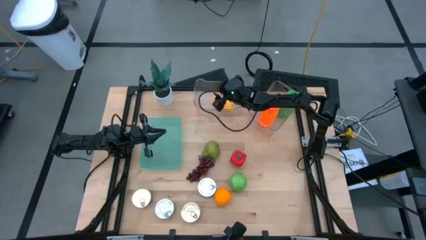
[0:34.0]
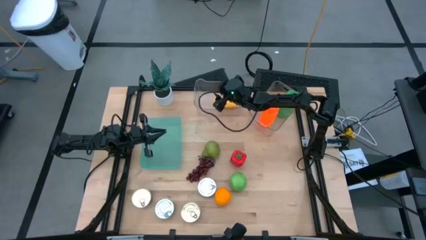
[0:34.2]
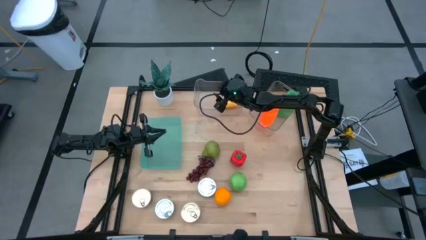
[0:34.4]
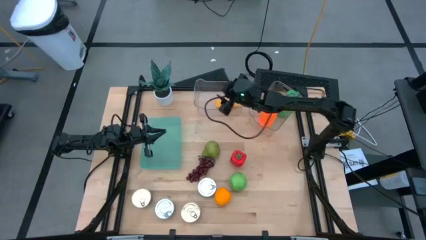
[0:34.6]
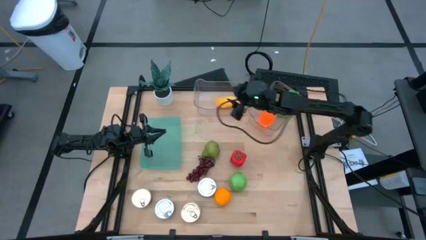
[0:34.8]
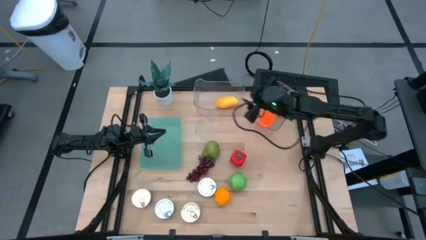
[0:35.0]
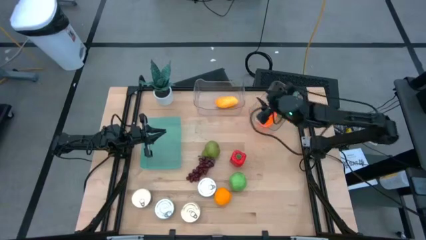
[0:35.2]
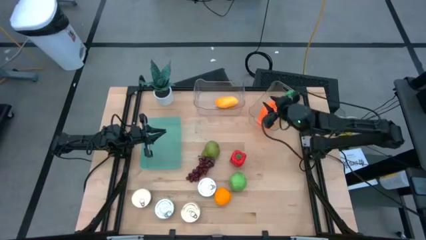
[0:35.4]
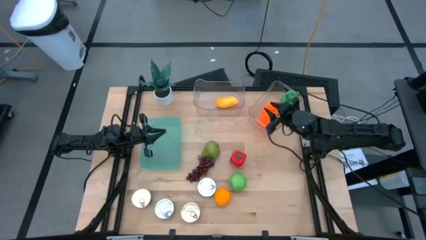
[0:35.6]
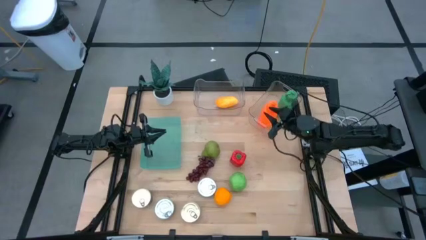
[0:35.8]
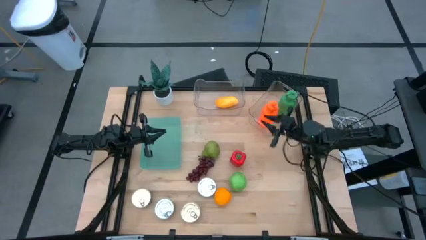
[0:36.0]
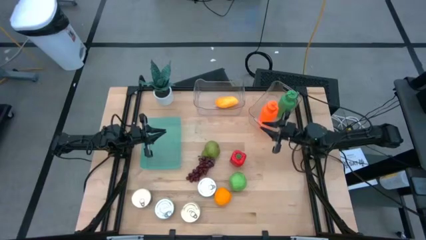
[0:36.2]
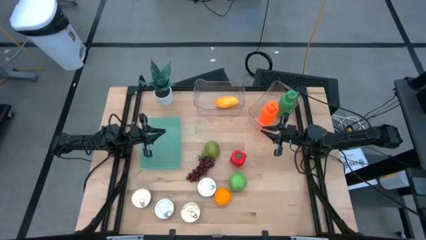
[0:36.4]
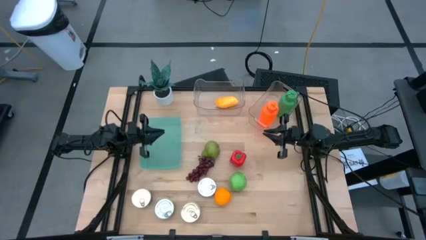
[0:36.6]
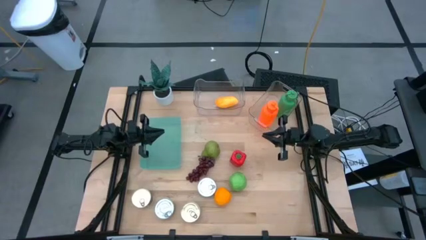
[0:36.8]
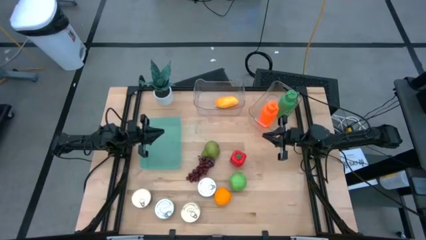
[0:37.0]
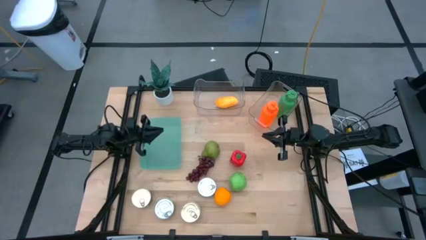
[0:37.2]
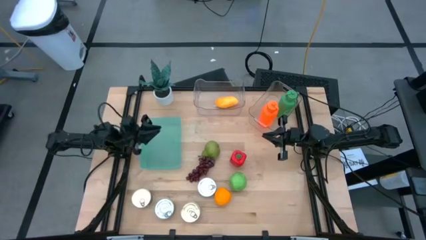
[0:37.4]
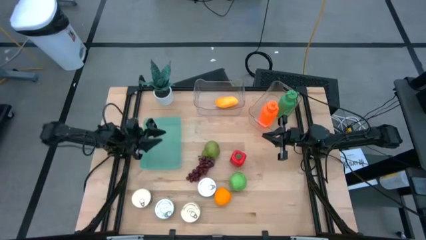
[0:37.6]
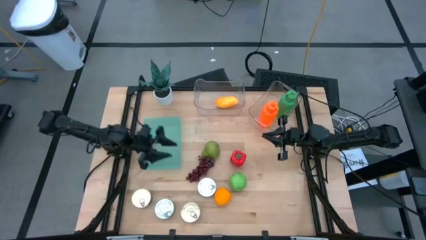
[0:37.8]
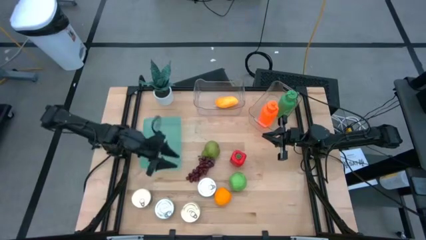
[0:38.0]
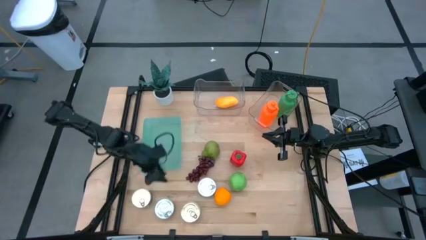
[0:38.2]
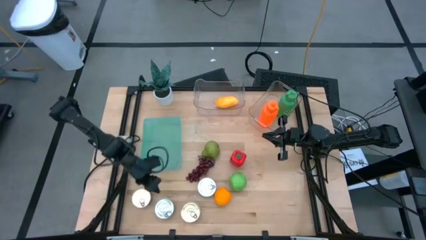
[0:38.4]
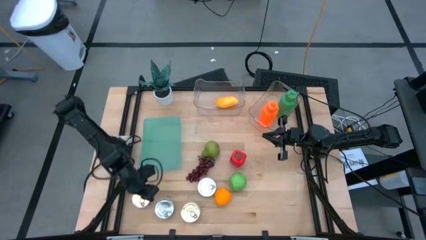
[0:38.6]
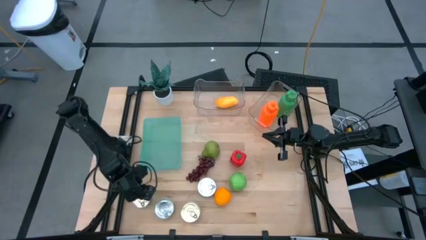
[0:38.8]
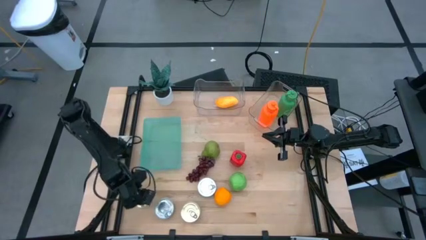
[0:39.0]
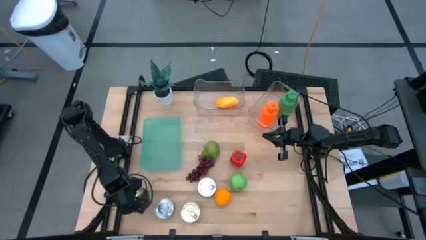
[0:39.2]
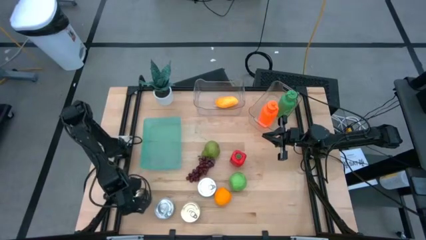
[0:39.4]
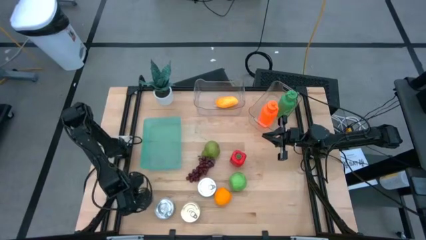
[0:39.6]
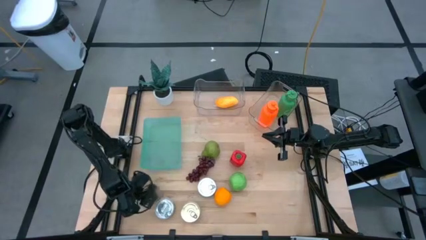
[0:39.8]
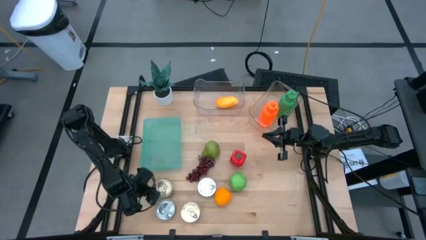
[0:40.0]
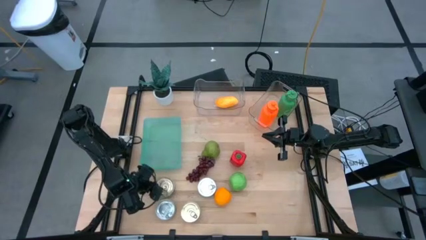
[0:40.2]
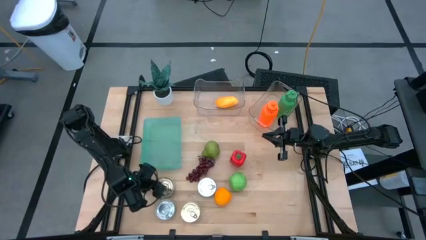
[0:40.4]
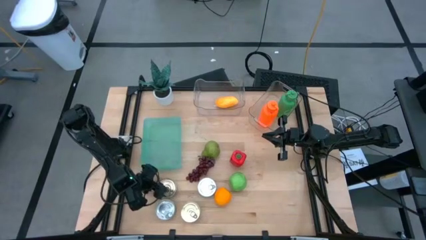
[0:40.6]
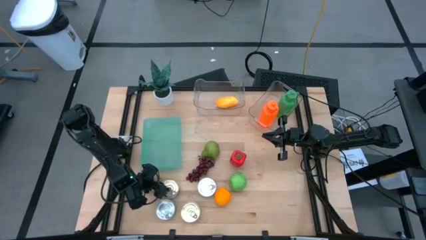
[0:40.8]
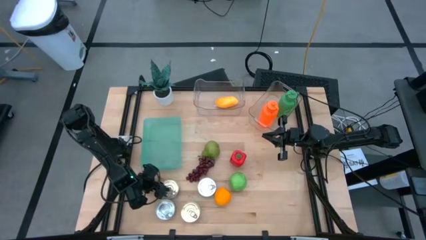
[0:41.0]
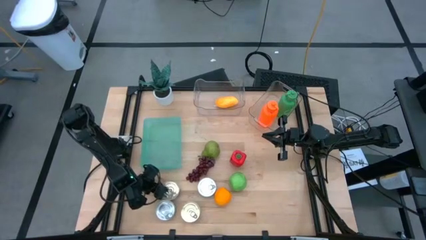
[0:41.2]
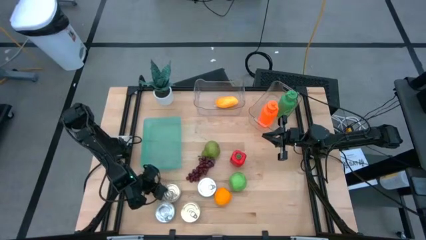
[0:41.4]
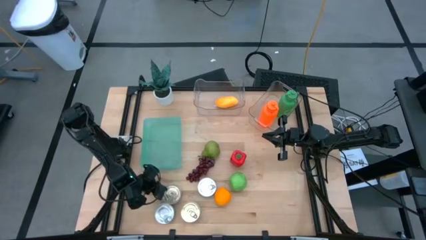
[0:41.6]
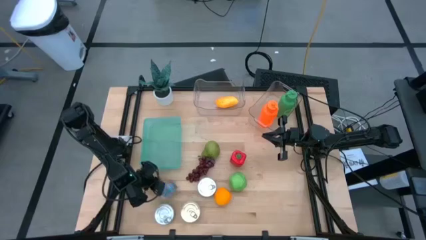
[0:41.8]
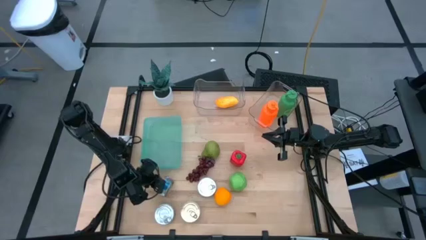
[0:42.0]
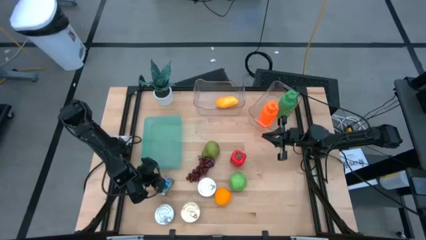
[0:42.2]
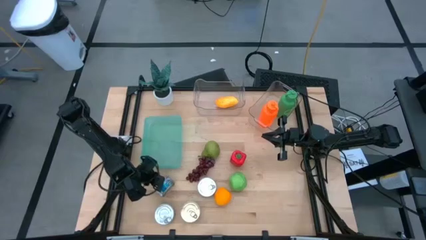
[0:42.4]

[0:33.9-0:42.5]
Task: Pick & Place Food Item
Put the blue pink tuna can into the green bin

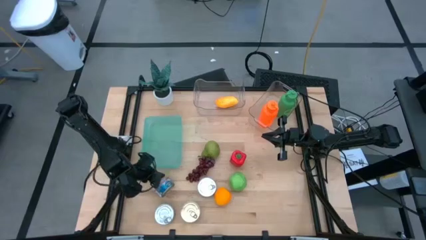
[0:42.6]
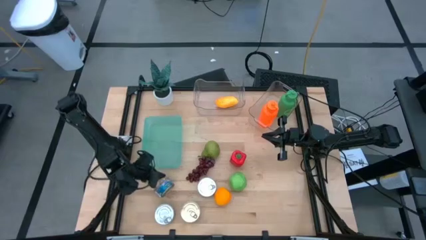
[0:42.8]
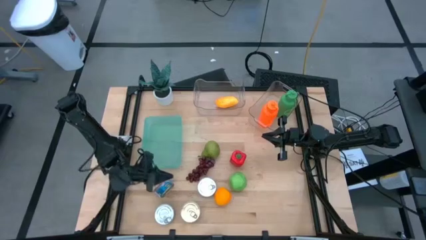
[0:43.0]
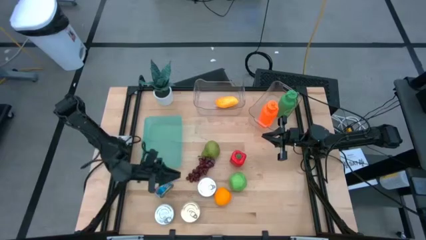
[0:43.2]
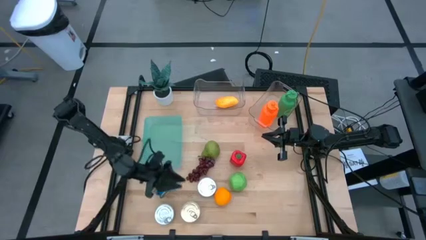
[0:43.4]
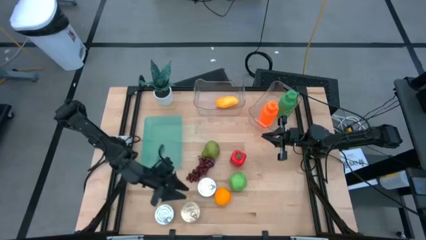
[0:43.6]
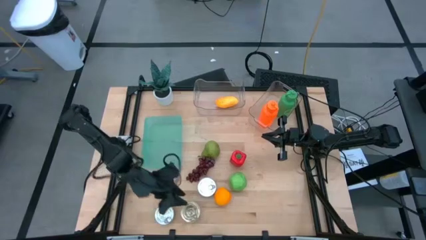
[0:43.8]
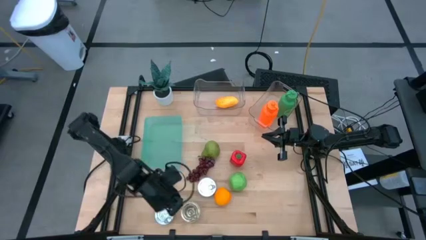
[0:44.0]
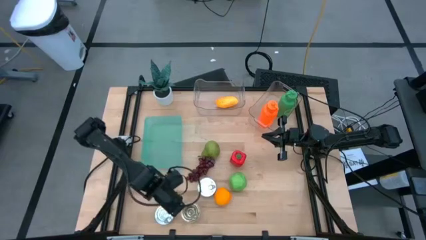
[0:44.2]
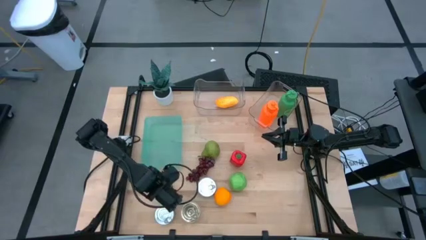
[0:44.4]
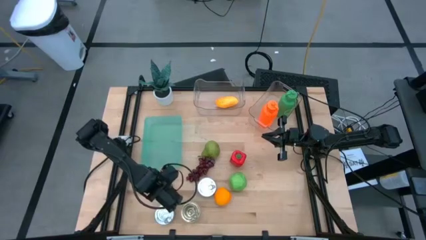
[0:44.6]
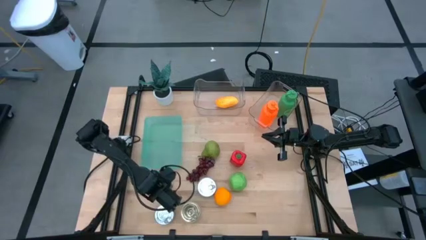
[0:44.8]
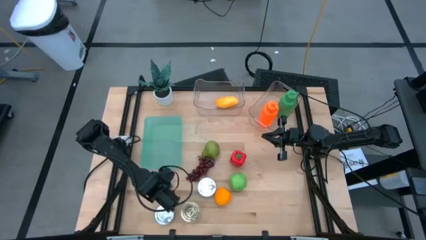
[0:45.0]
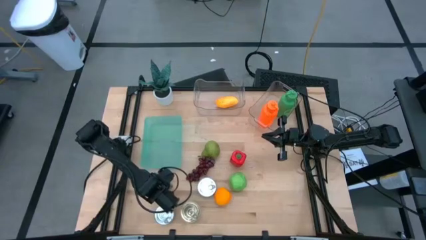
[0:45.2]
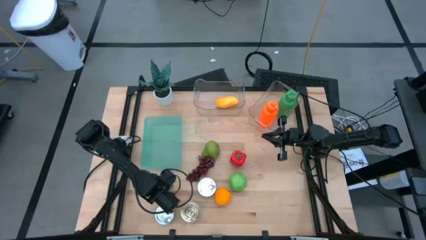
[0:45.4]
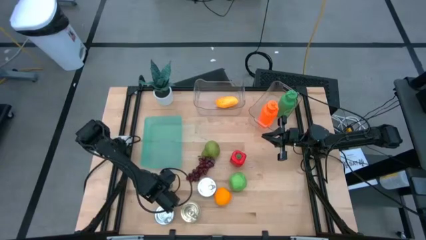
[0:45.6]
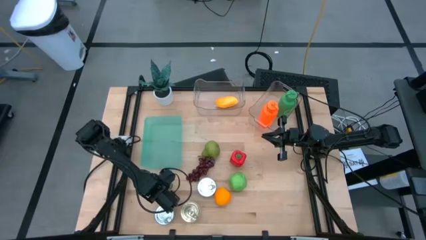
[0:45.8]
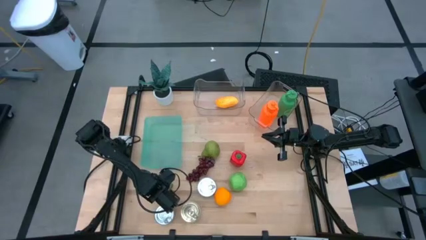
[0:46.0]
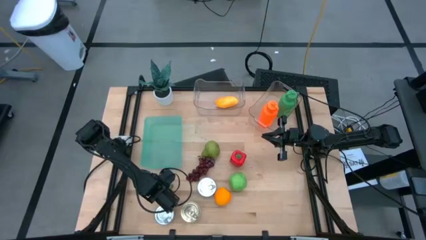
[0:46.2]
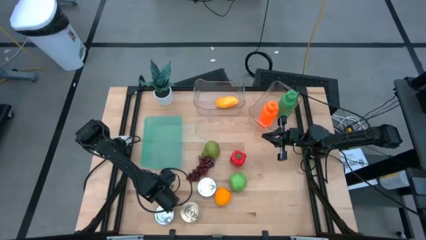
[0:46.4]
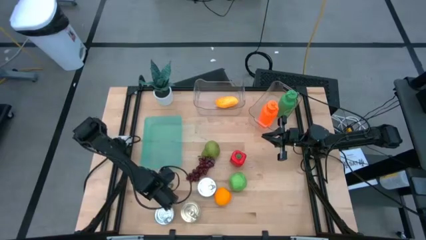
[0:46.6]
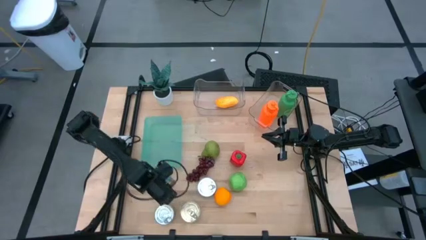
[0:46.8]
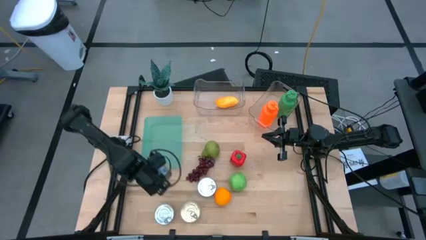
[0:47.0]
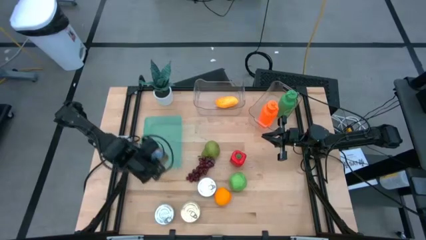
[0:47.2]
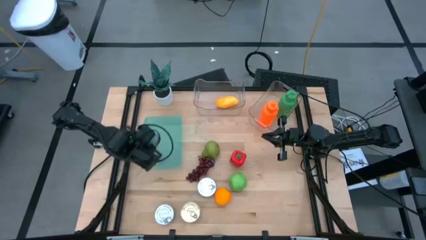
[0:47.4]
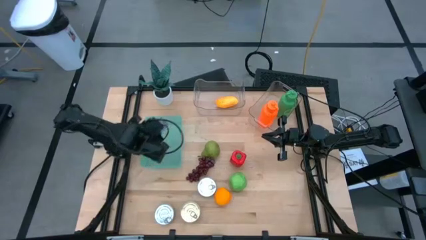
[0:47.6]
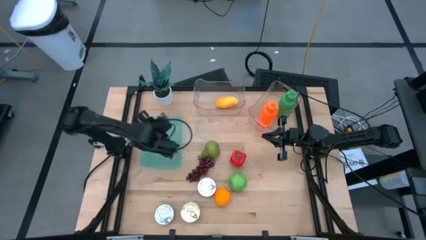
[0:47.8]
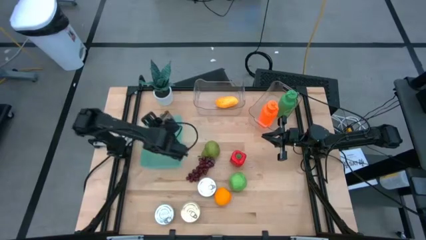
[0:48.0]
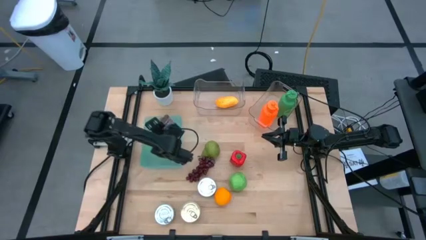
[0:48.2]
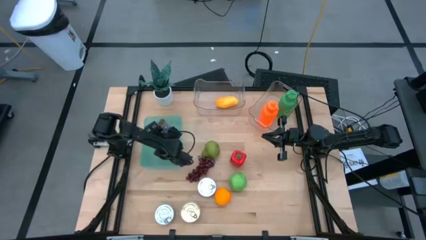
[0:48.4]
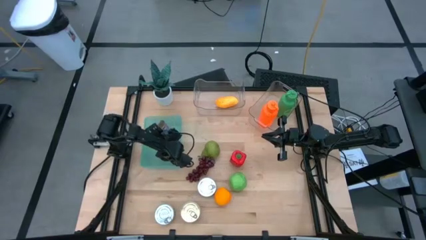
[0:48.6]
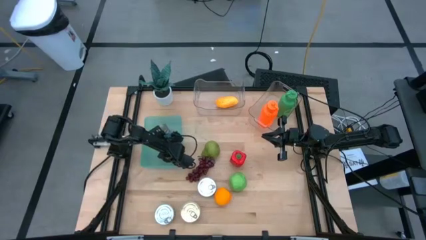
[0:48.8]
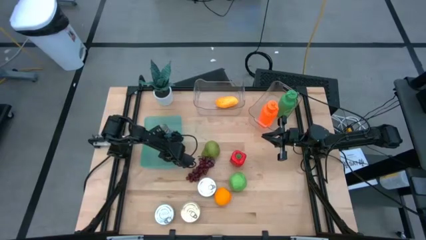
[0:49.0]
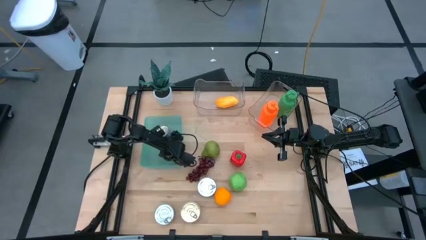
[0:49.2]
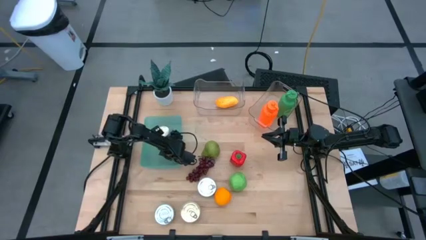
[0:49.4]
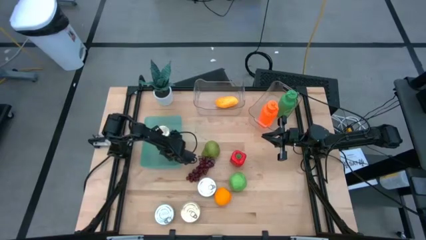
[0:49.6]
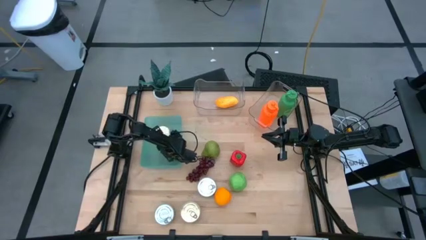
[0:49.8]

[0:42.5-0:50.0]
Put the blue pink tuna can into the green bin
